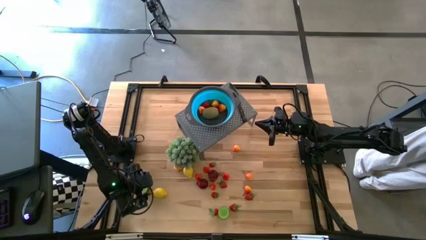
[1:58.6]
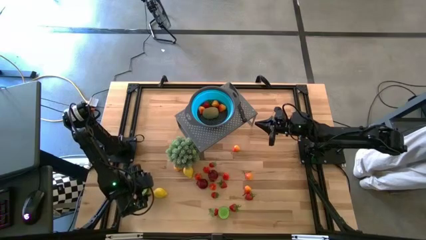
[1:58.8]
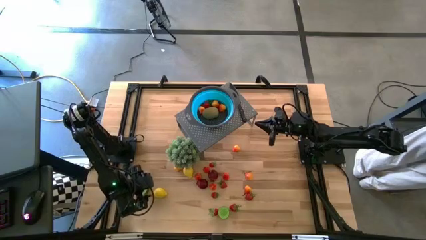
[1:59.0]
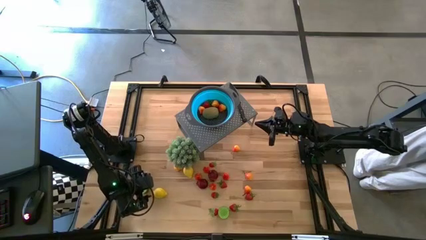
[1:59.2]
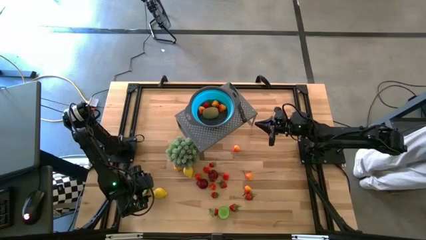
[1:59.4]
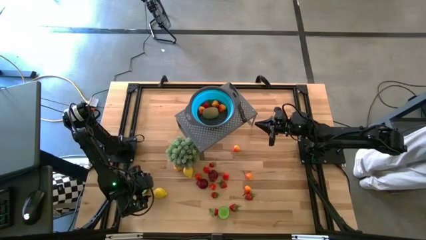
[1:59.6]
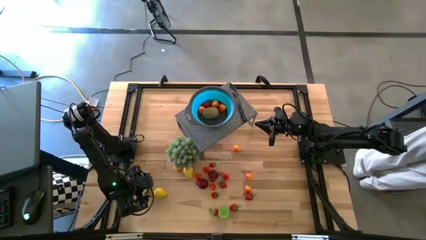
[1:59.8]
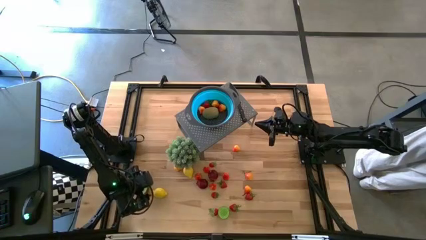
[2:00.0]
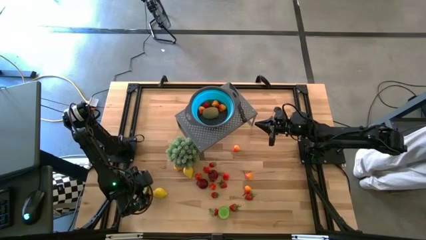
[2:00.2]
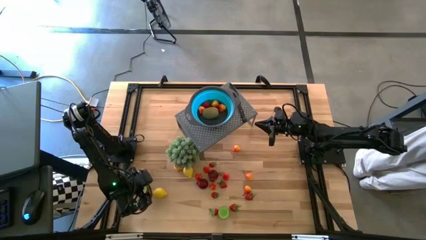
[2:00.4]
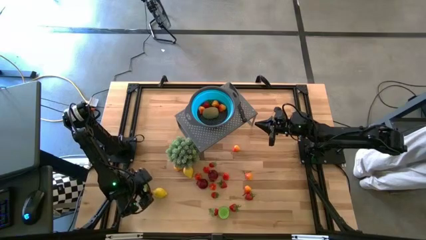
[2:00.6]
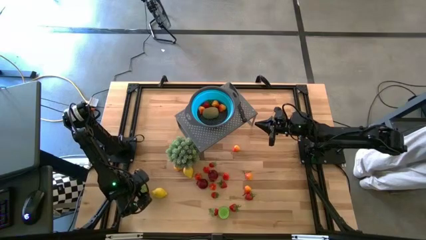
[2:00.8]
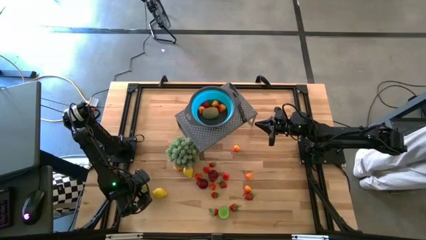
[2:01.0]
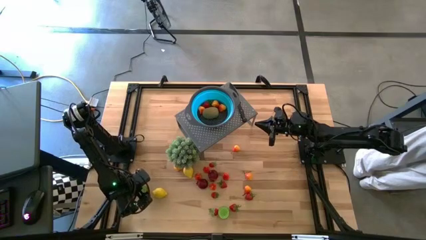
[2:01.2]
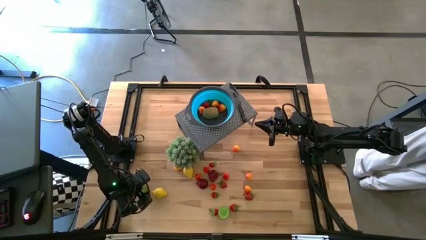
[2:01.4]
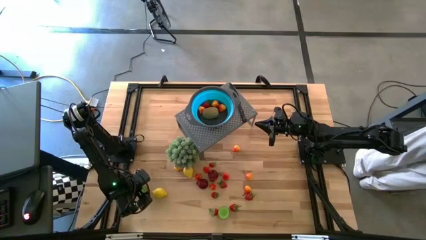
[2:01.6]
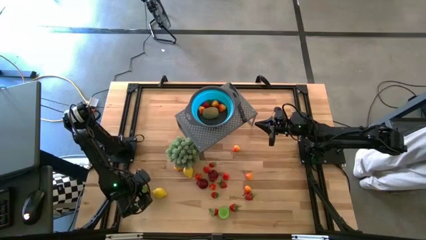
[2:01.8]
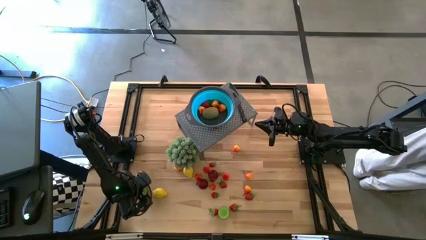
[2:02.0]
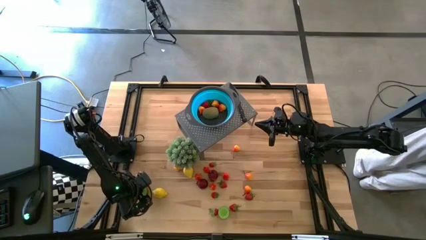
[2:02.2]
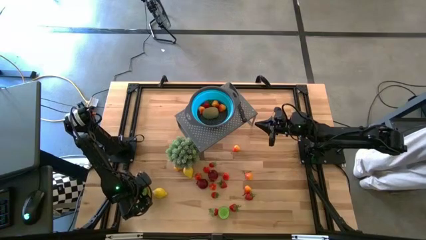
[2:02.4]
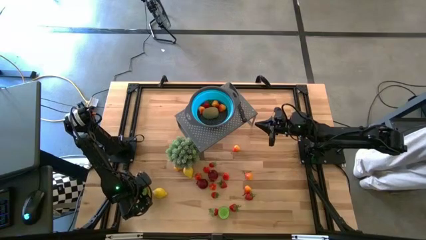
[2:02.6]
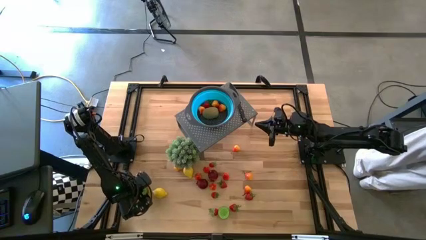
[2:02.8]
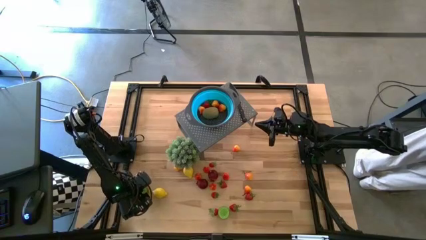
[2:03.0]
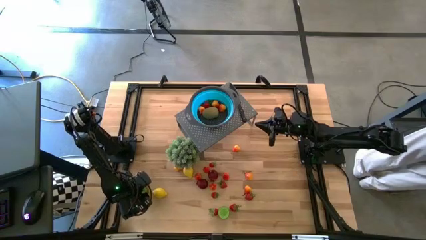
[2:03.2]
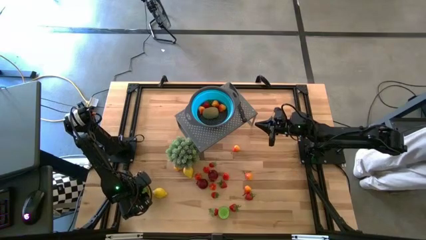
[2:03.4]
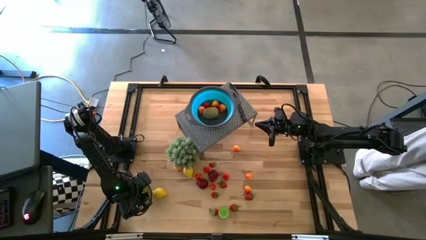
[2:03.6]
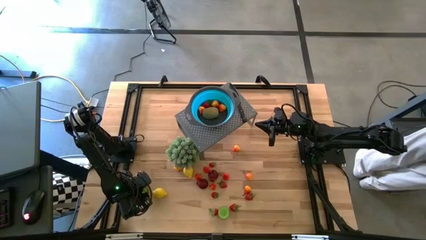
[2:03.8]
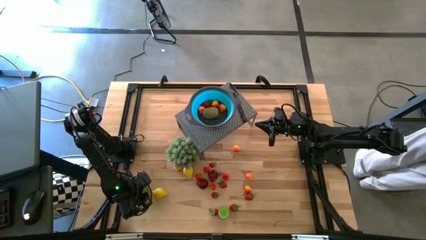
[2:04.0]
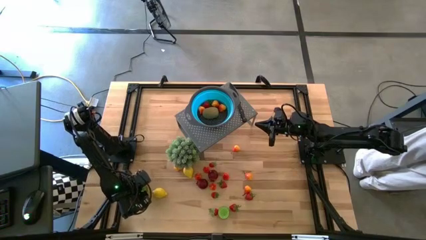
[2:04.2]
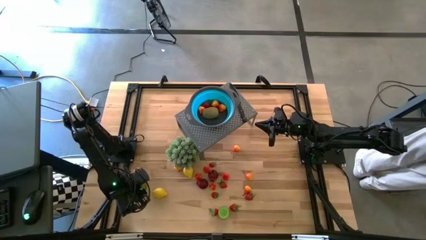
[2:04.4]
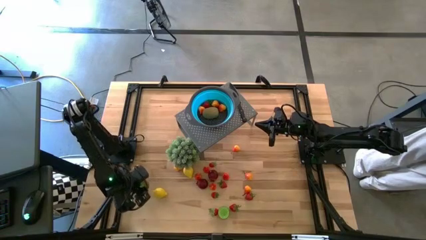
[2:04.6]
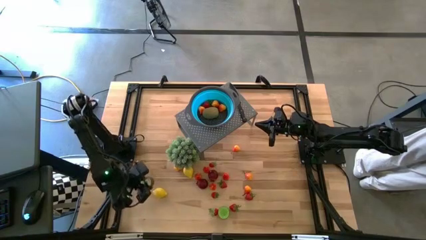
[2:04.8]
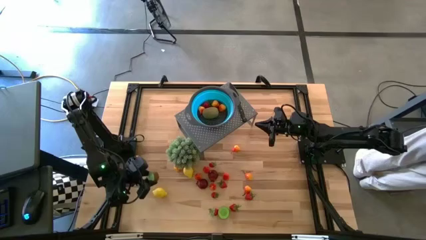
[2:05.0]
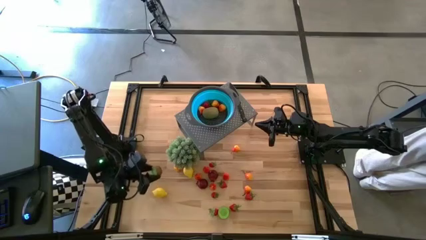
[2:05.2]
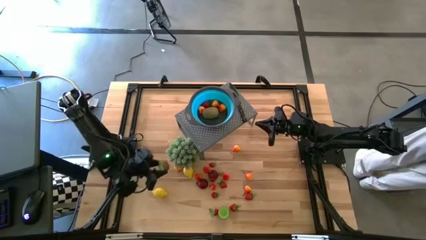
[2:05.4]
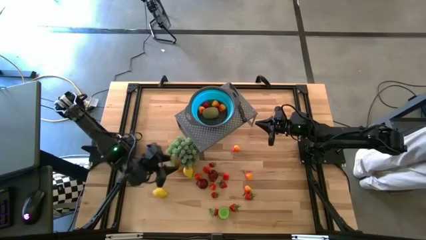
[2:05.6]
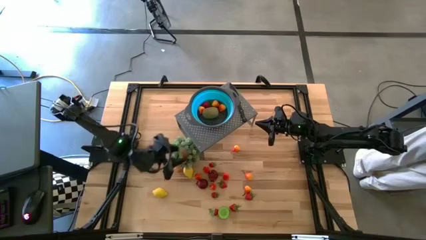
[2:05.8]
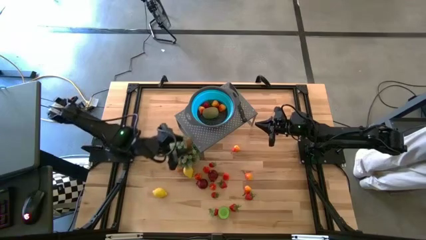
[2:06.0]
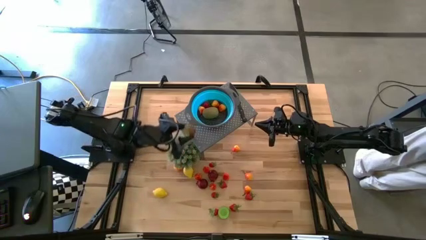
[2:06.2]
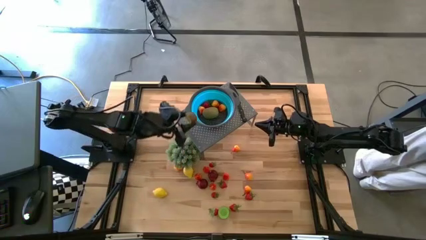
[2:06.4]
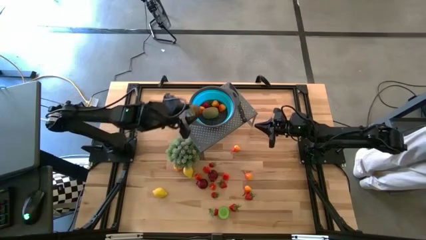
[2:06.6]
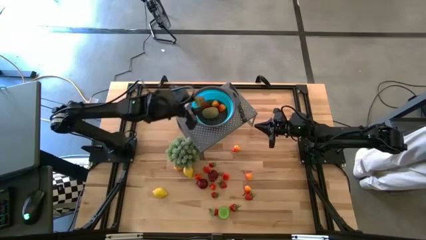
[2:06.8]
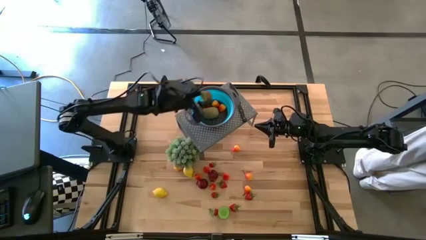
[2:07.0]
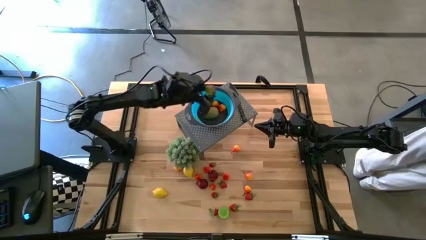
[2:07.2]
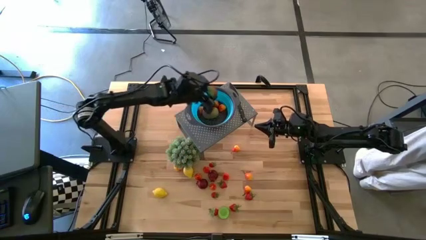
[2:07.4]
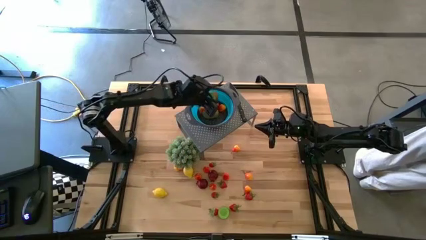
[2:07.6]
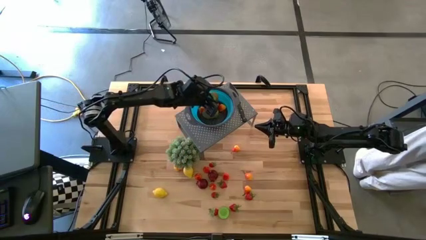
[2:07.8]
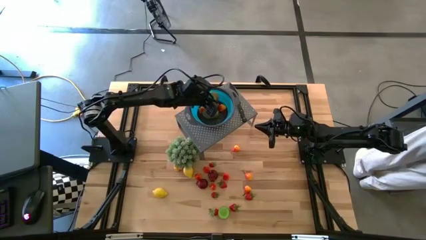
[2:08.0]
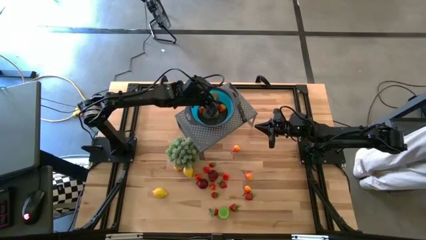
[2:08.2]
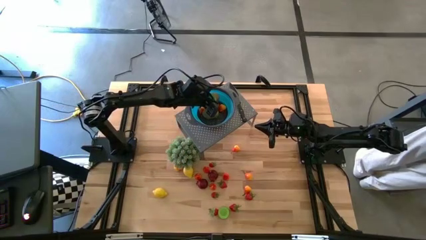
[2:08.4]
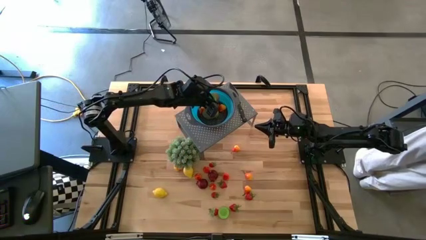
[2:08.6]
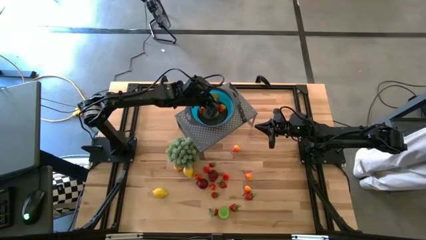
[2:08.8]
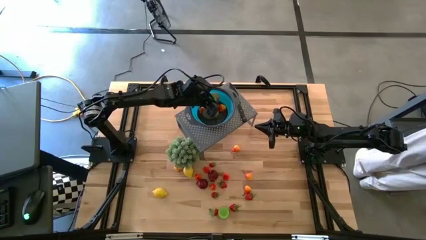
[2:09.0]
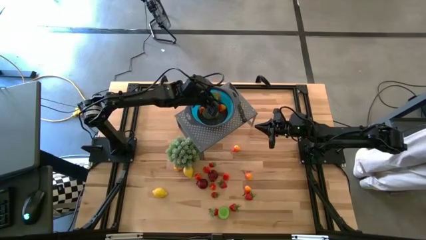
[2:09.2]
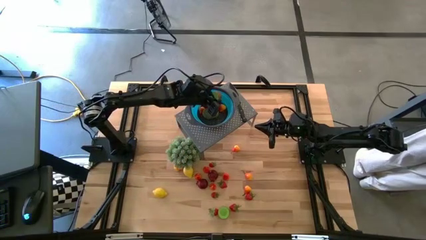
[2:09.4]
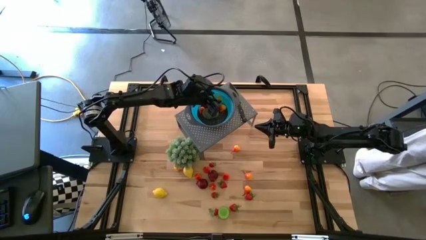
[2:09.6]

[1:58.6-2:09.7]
Task: Pick & Place Fruit
Put the kiwi into the blue strainer bowl on the shelf
